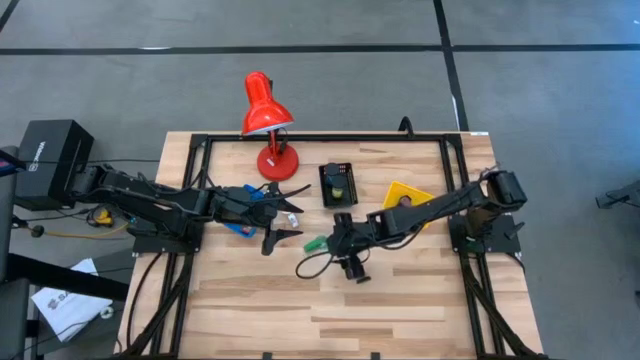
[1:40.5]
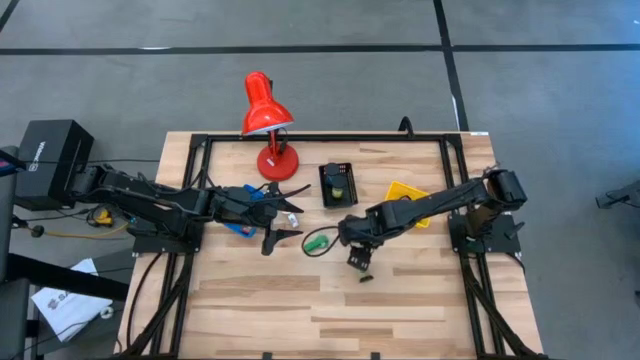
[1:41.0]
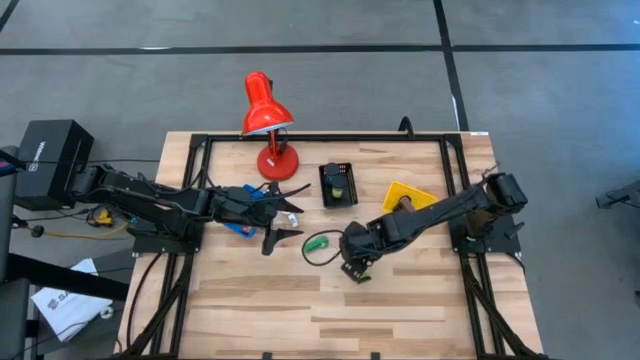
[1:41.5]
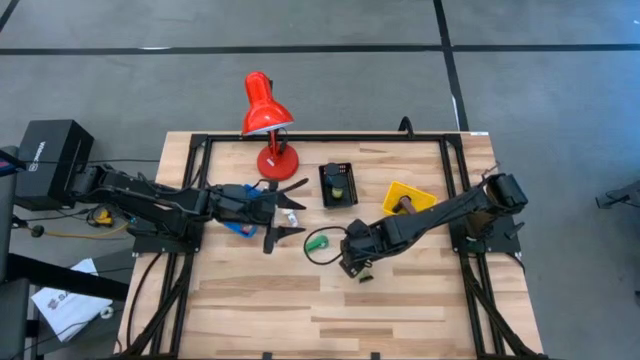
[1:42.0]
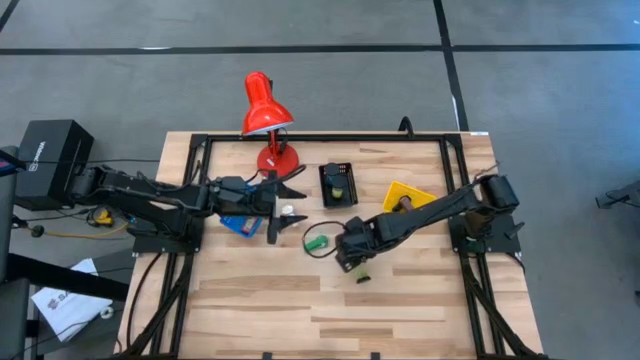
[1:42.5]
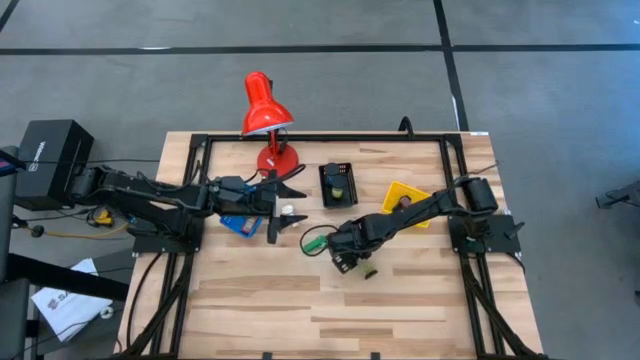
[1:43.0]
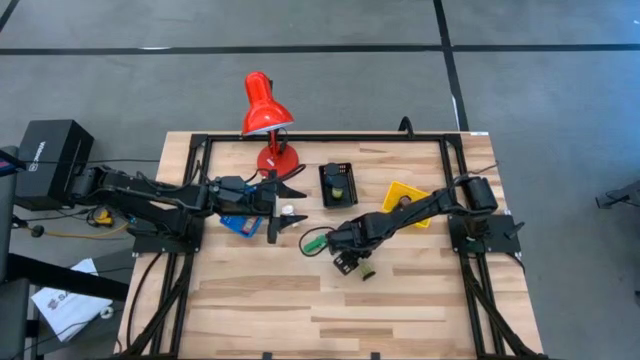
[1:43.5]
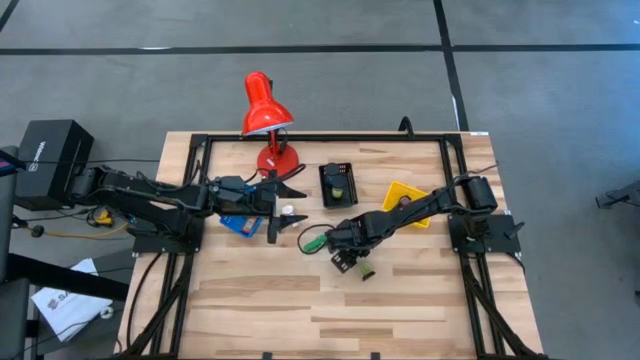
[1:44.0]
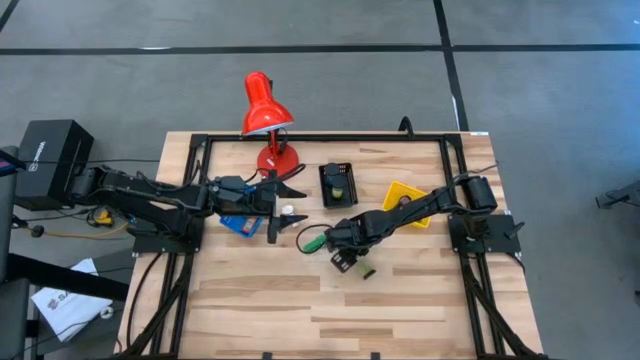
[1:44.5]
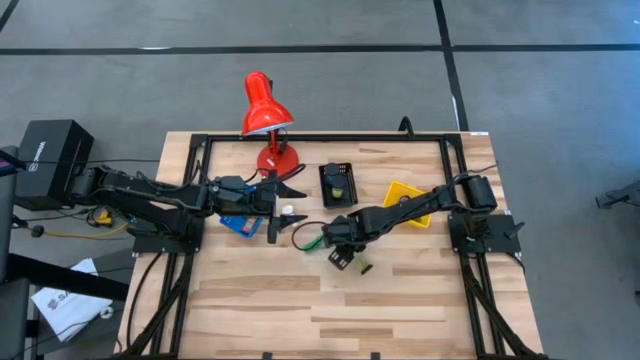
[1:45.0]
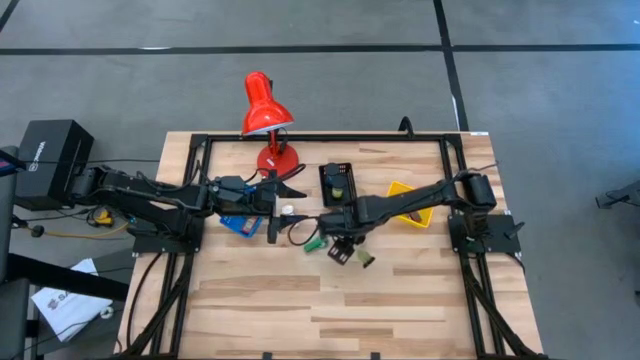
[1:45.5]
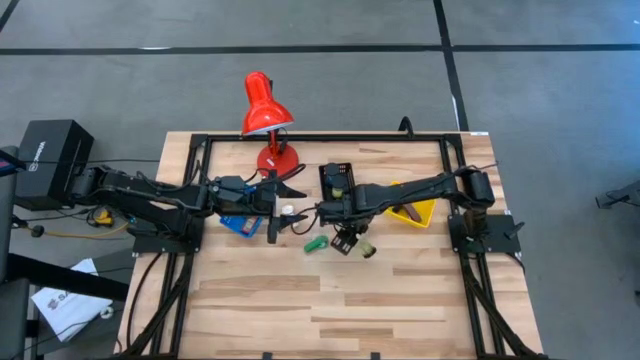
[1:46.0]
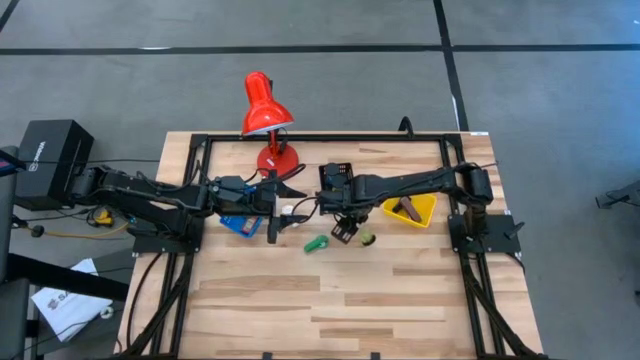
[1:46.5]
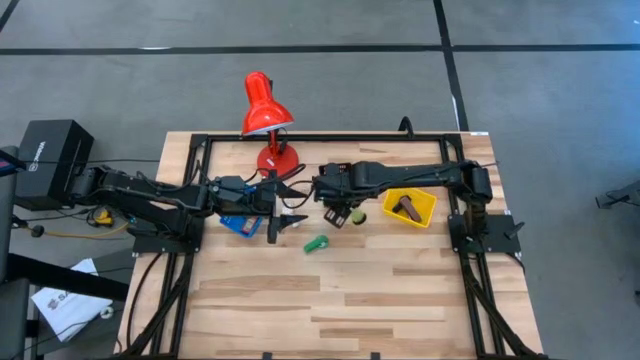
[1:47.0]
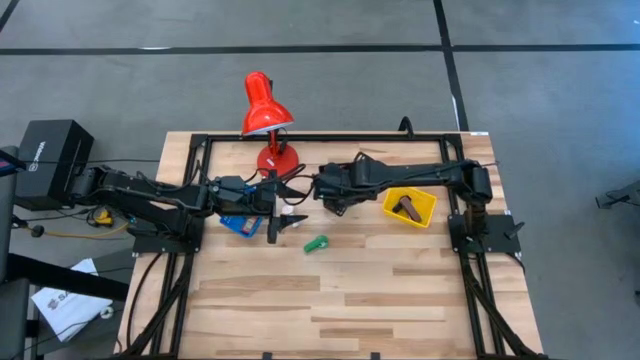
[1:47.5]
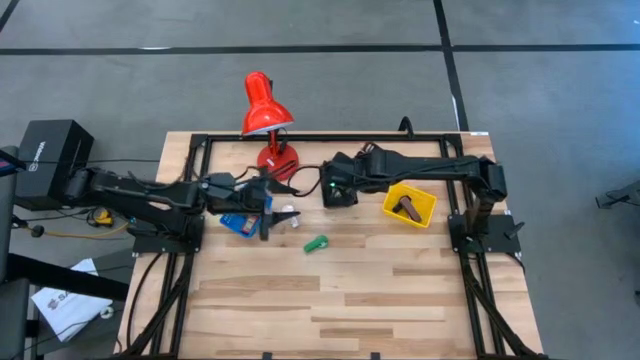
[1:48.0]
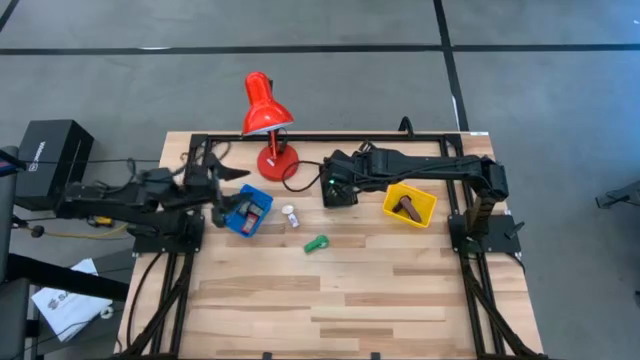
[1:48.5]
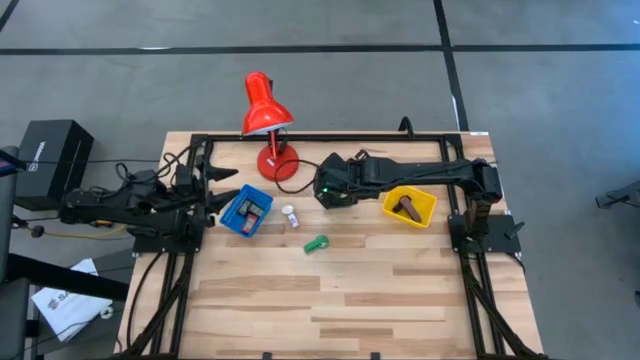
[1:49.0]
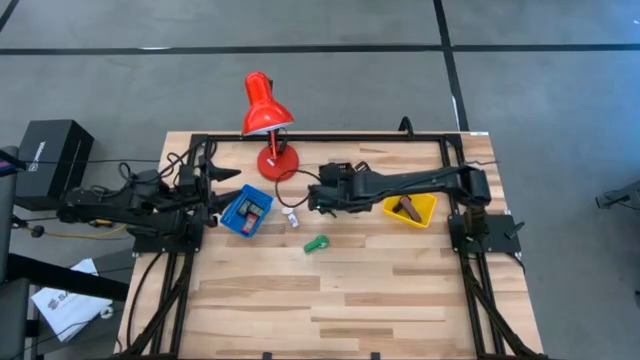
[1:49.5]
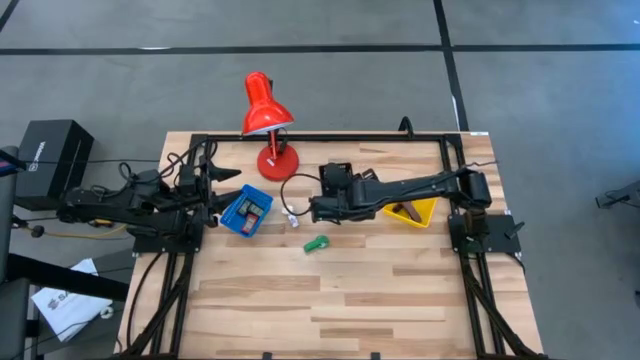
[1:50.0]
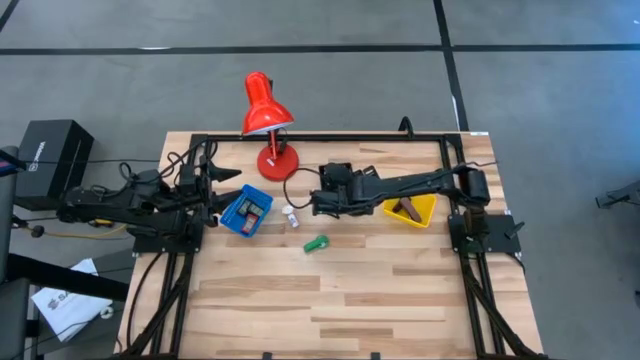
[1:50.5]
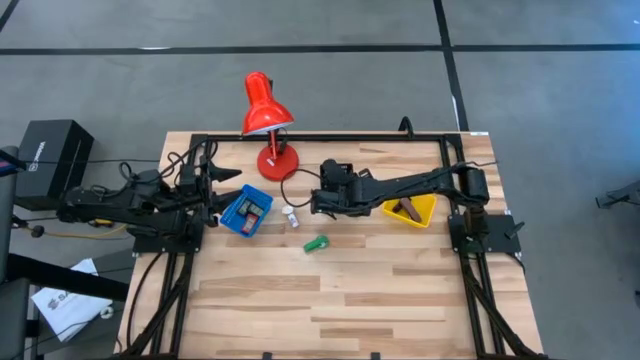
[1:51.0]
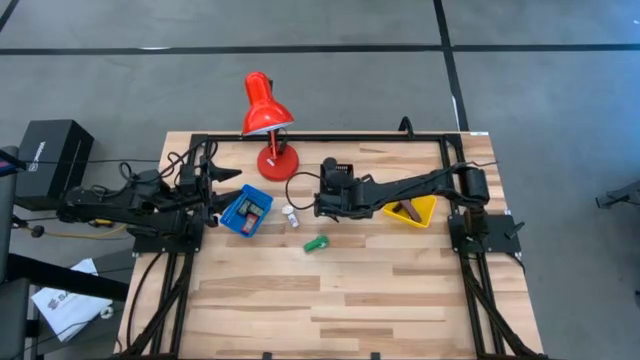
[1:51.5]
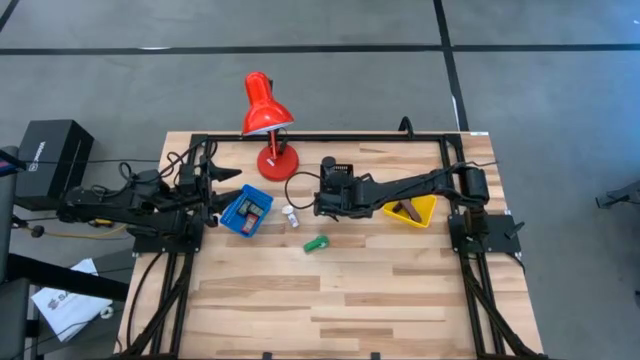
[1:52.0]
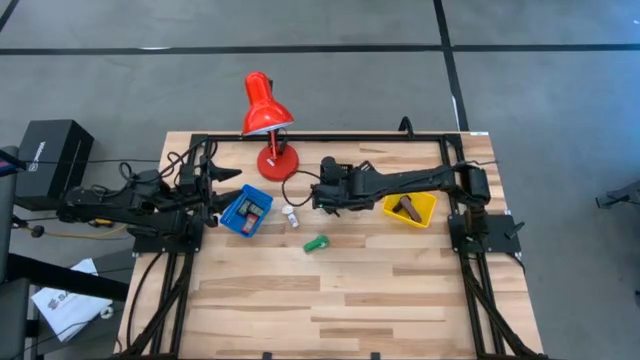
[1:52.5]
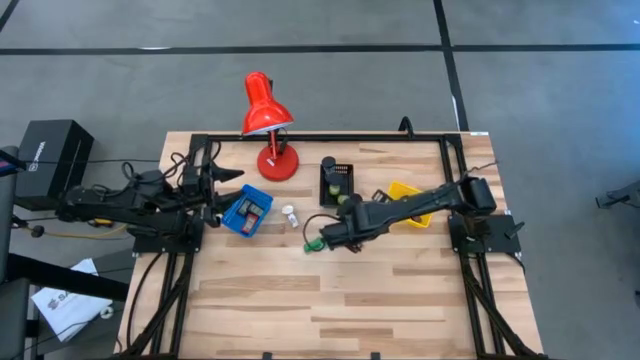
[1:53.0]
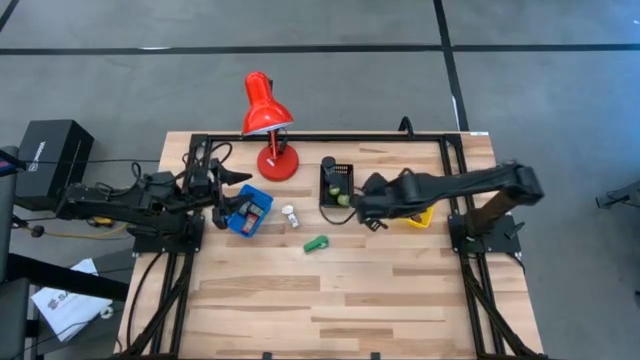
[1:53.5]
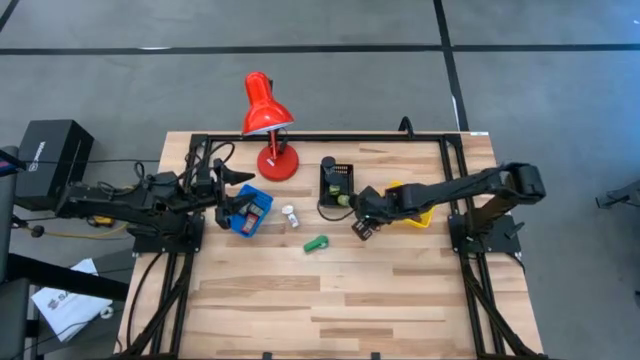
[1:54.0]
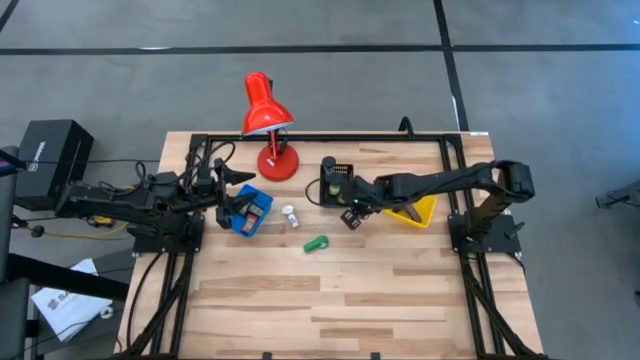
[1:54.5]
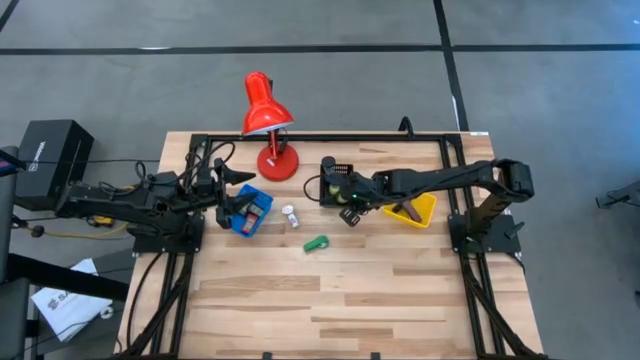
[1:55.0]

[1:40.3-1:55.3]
Task: Pick & Place Office items
Put the yellow hourglass into the black basket

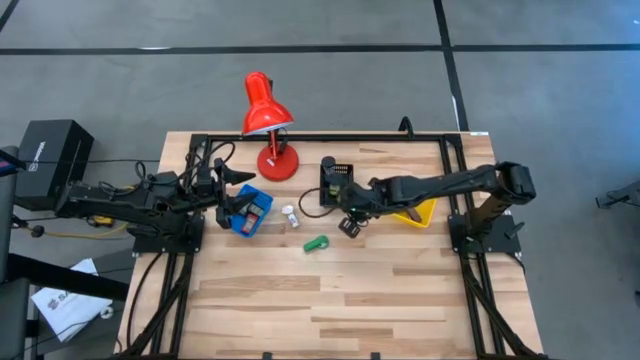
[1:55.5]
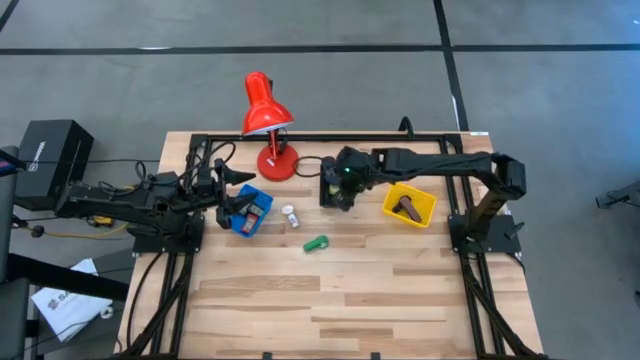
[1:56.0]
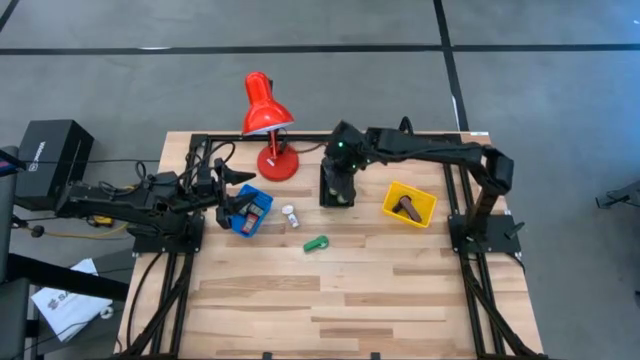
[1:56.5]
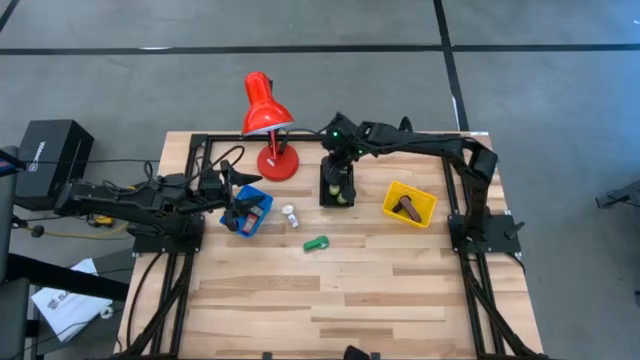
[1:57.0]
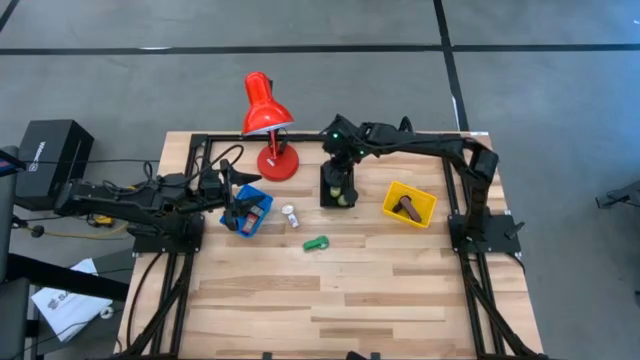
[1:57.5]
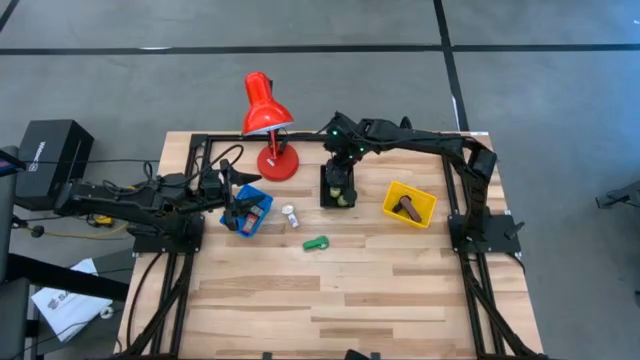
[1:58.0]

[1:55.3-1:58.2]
Adjust the yellow hourglass in the black basket

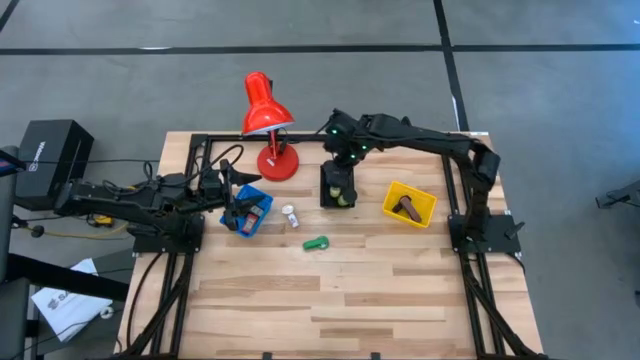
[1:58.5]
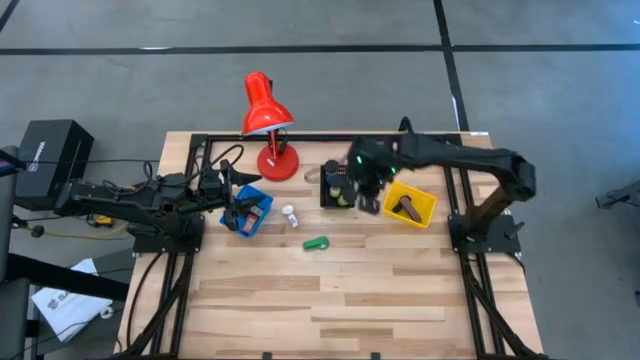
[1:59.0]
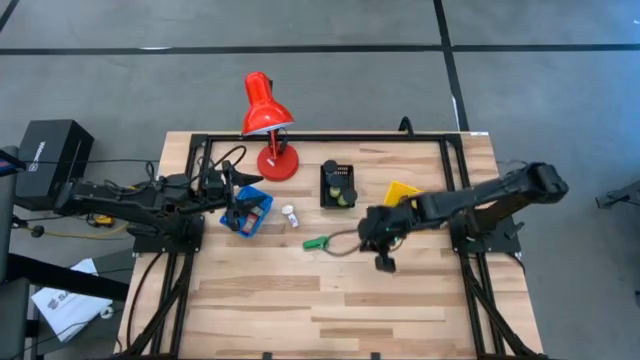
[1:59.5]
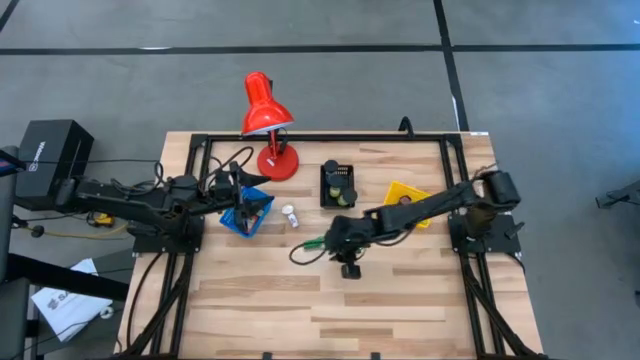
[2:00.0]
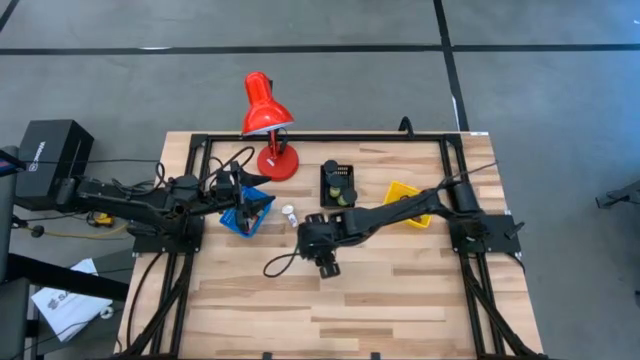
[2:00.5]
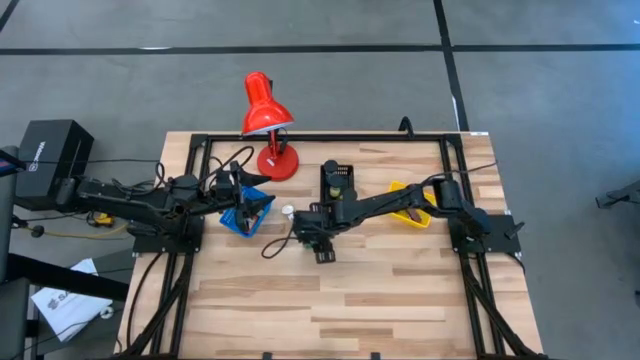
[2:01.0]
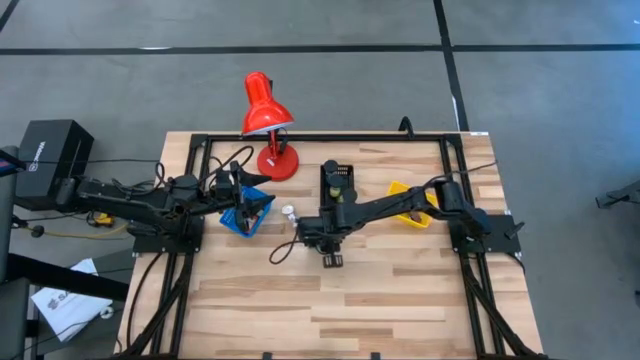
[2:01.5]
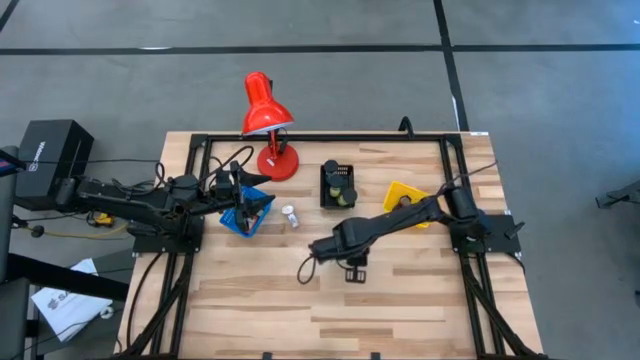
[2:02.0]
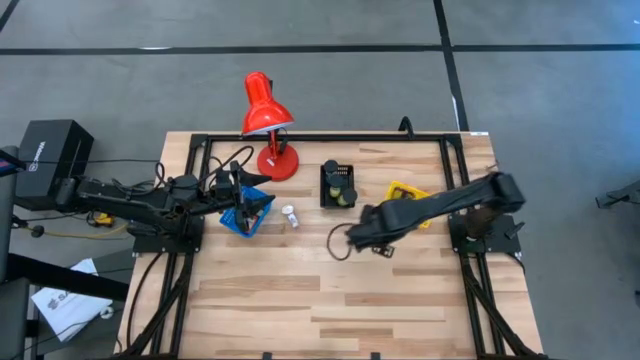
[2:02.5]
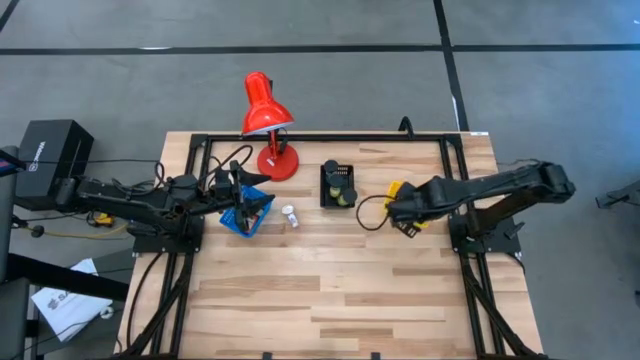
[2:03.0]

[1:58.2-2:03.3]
Put the green watch into the yellow basket
